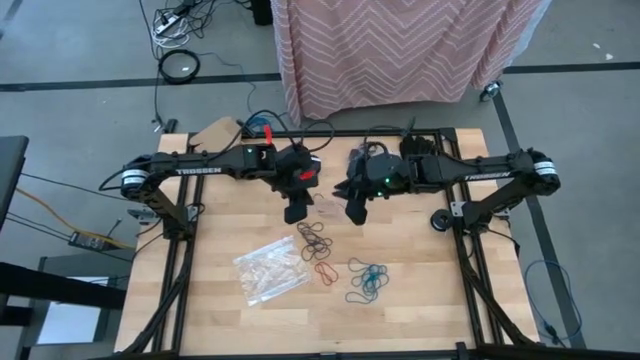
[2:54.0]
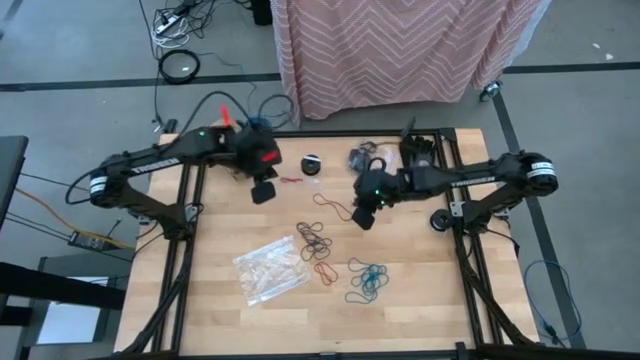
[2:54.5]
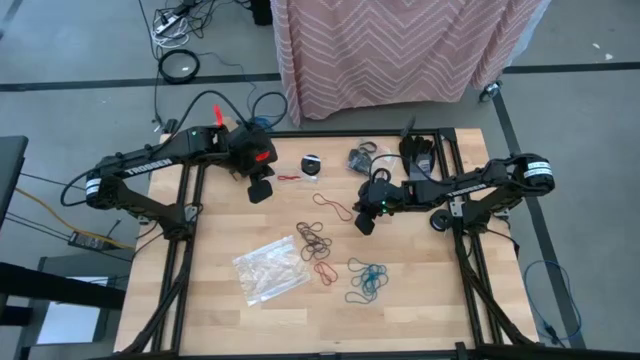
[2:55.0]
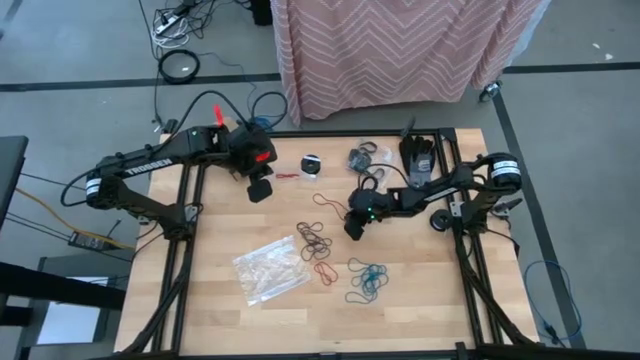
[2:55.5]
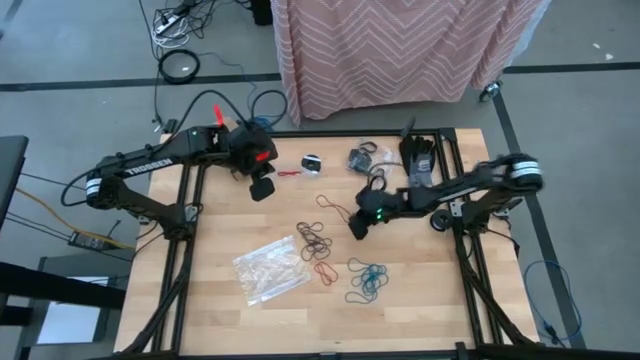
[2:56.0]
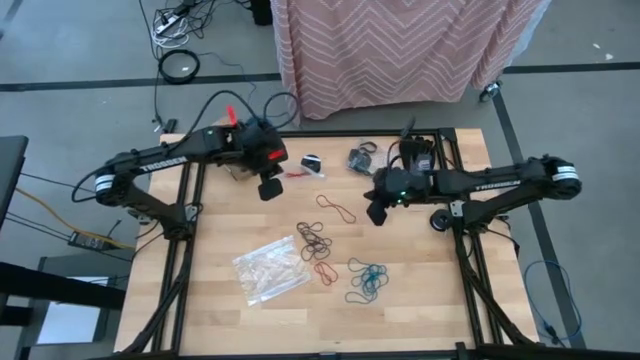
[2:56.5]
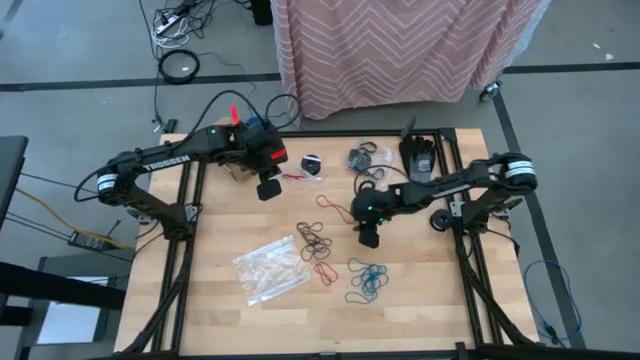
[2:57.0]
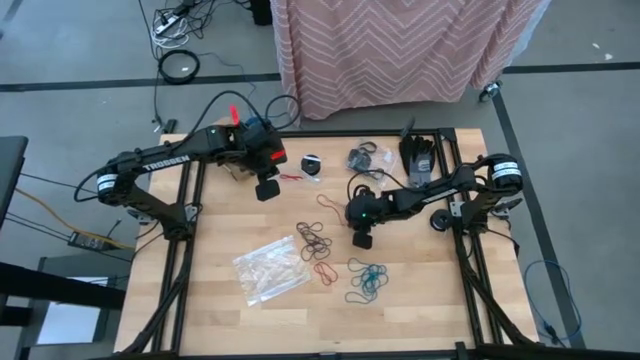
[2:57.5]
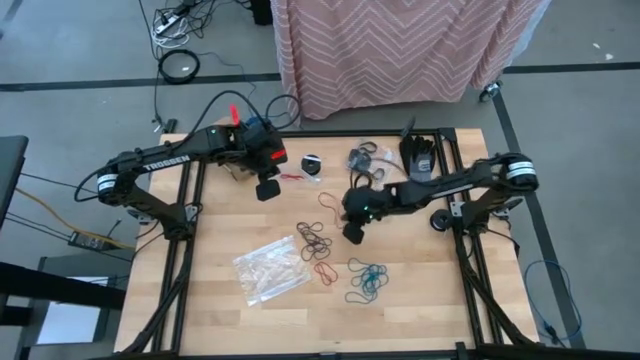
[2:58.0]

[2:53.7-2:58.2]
Task: Sort rubber bands
Put the red rubber band into the transparent zip bag

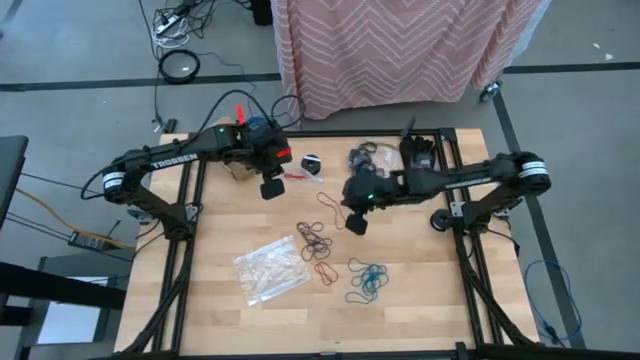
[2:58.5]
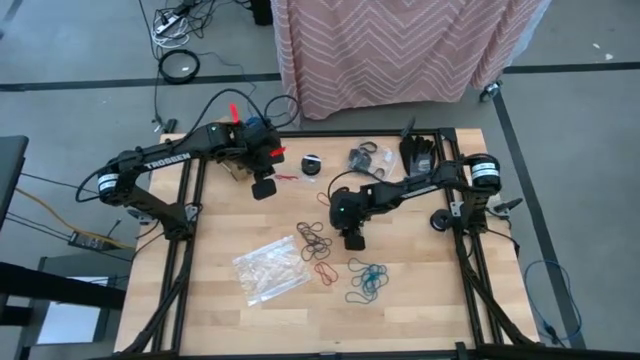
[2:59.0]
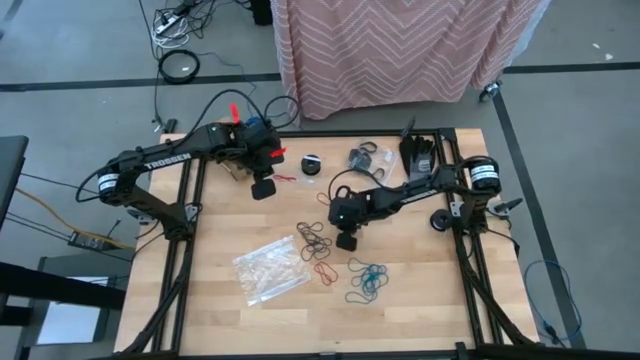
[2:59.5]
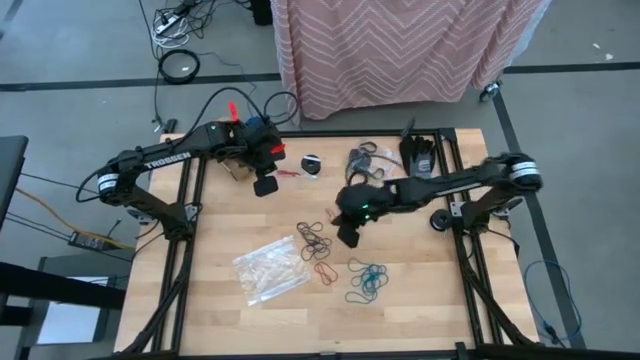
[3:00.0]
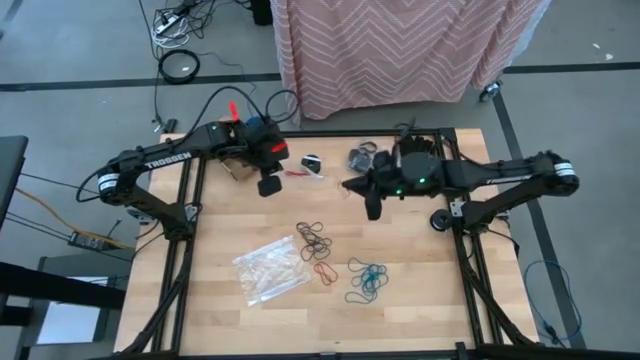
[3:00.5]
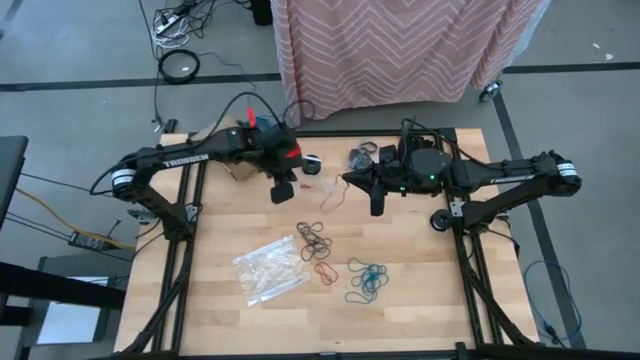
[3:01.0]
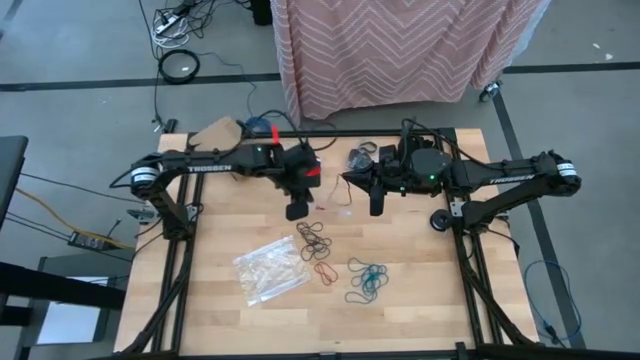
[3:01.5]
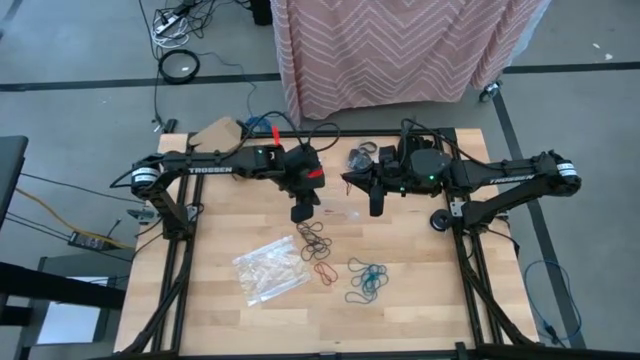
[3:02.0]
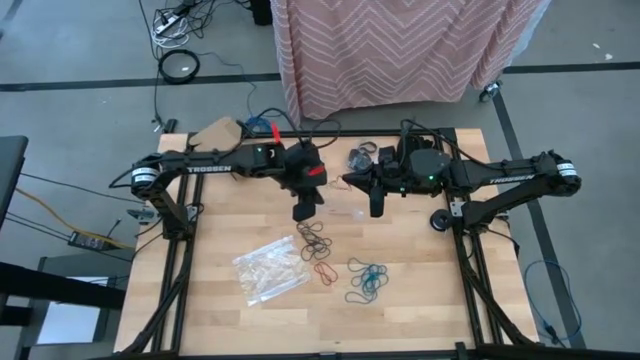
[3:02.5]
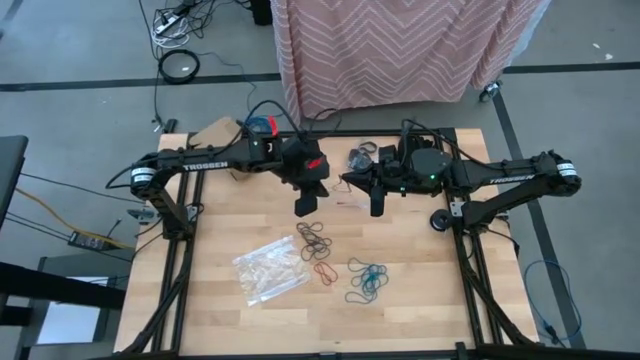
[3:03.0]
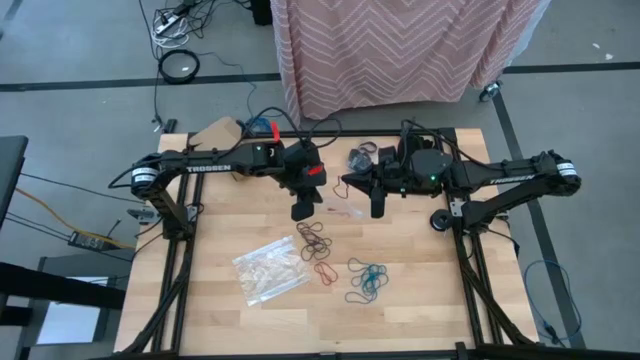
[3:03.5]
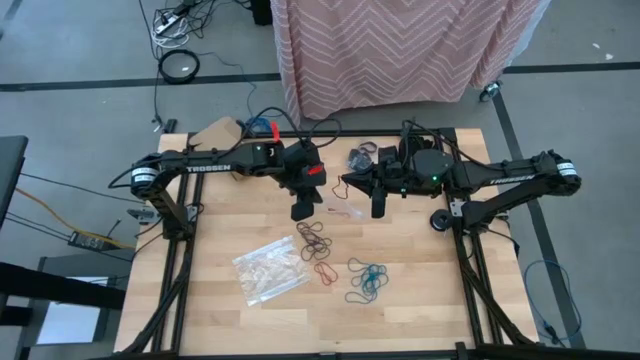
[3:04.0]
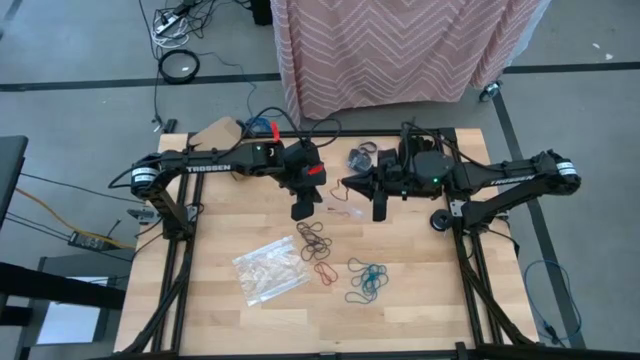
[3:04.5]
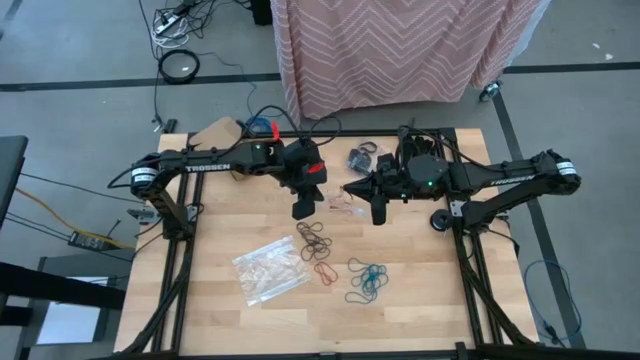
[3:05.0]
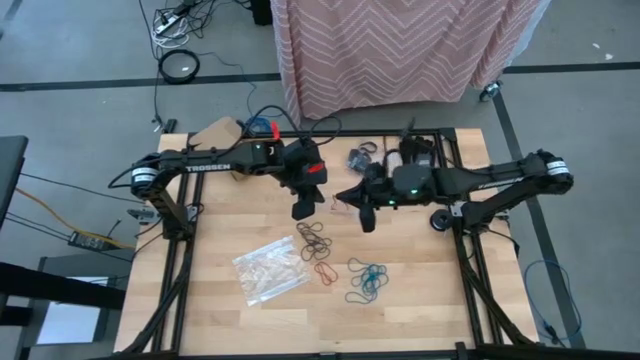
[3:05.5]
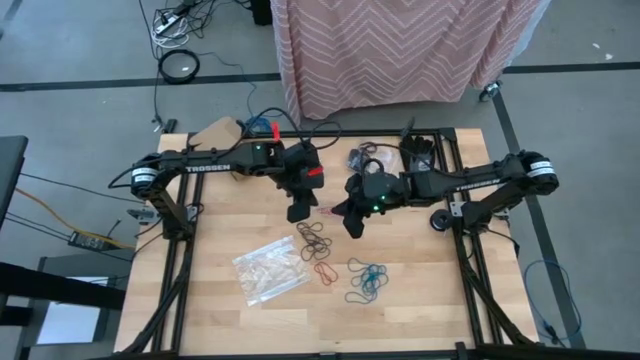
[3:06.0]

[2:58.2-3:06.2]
Put the red rubber band into the transparent zip bag

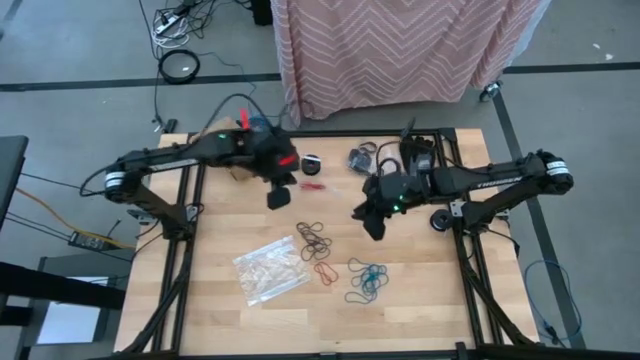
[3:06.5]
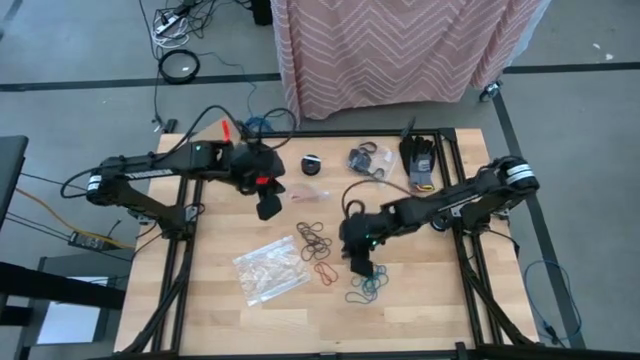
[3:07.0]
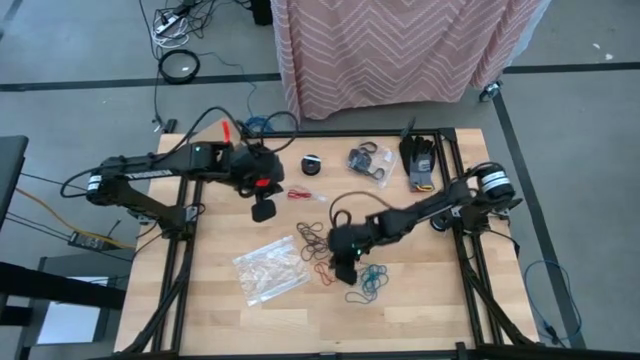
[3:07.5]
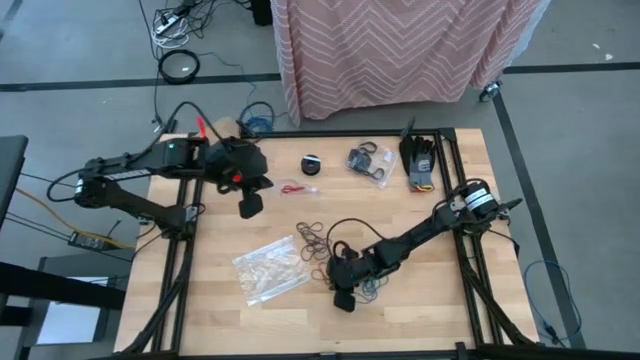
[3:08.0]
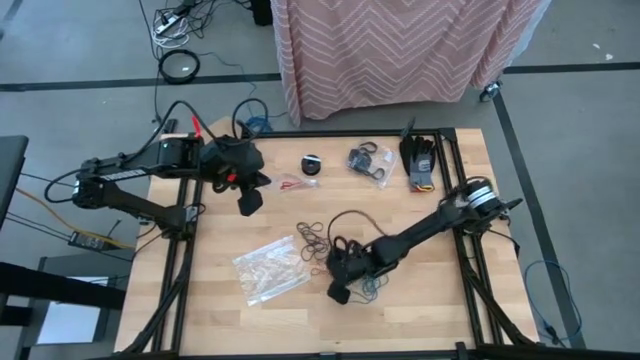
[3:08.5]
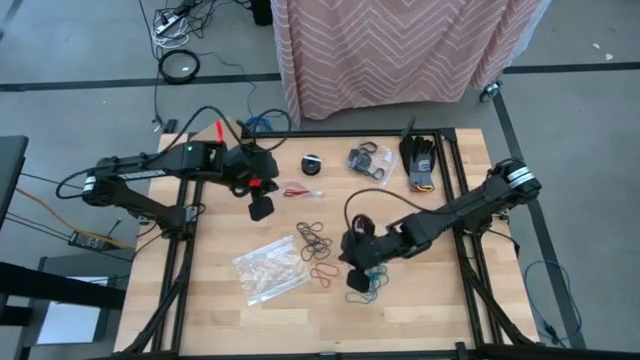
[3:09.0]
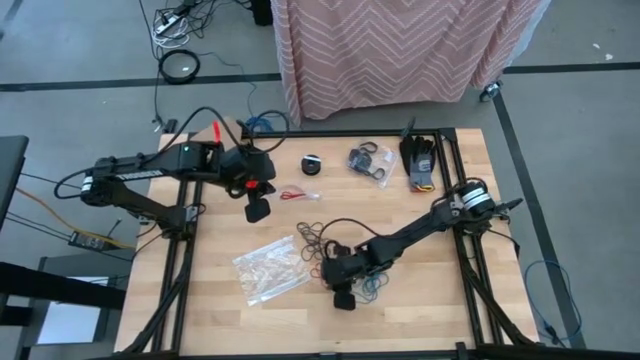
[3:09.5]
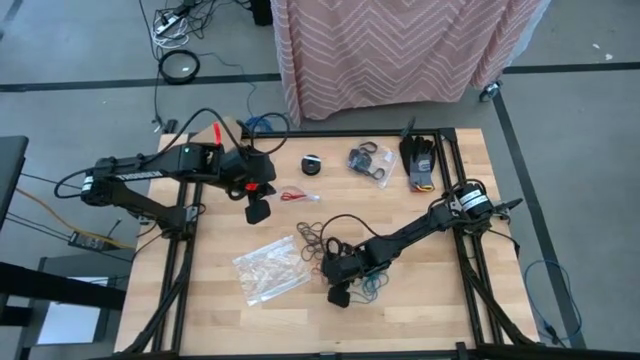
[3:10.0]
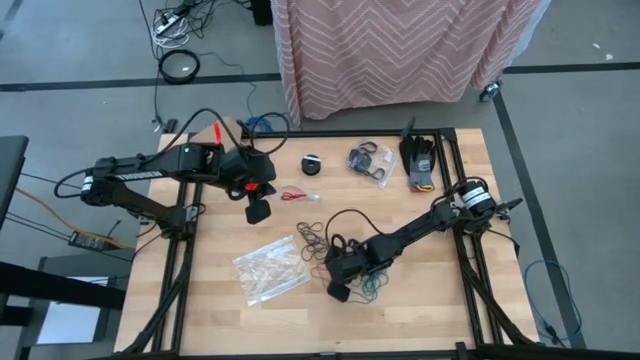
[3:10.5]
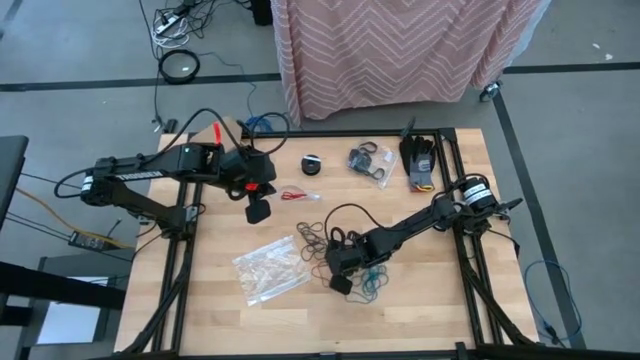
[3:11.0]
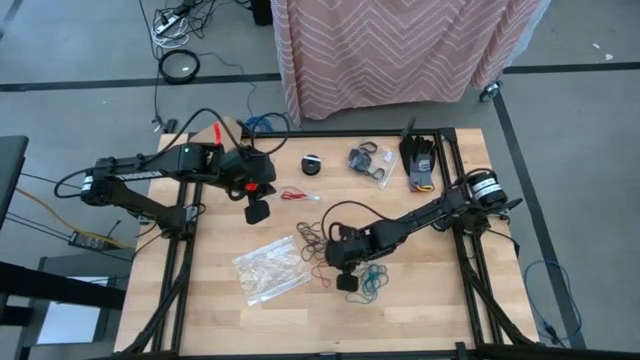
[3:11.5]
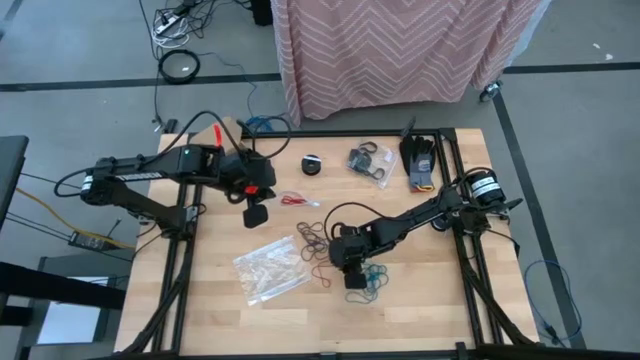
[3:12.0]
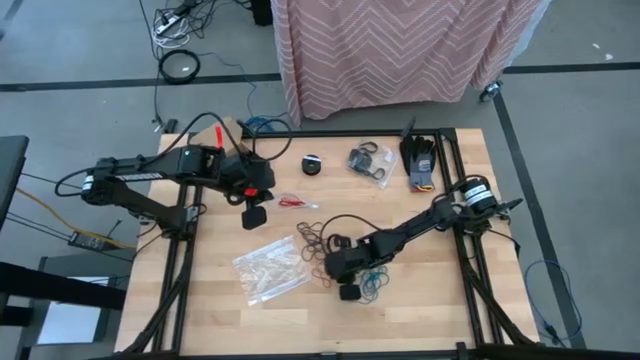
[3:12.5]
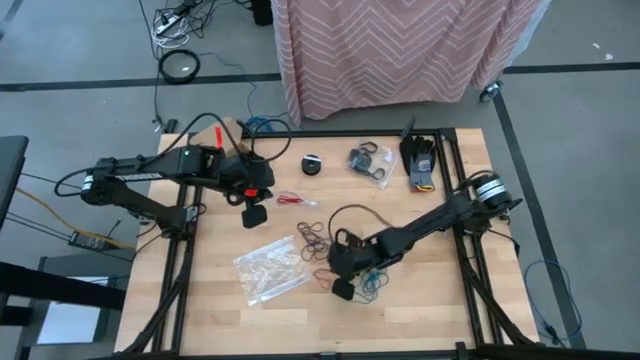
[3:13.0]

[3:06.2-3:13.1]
Put the red rubber band into the transparent zip bag

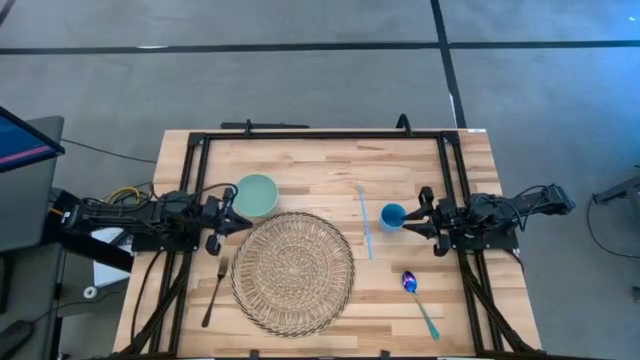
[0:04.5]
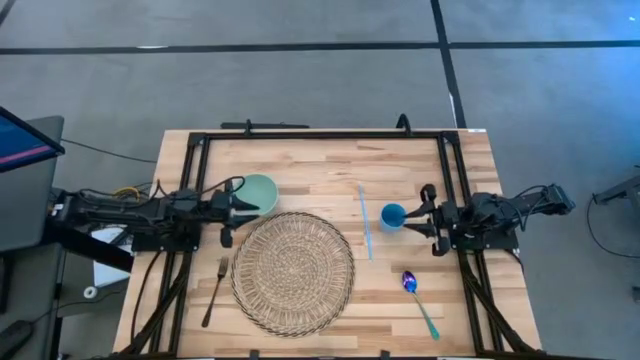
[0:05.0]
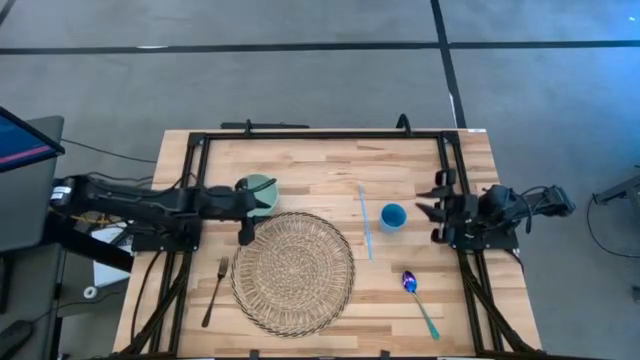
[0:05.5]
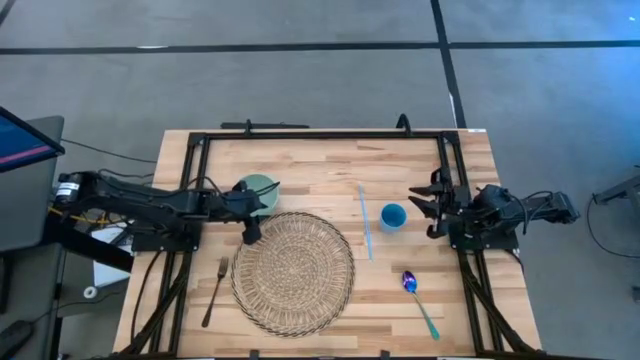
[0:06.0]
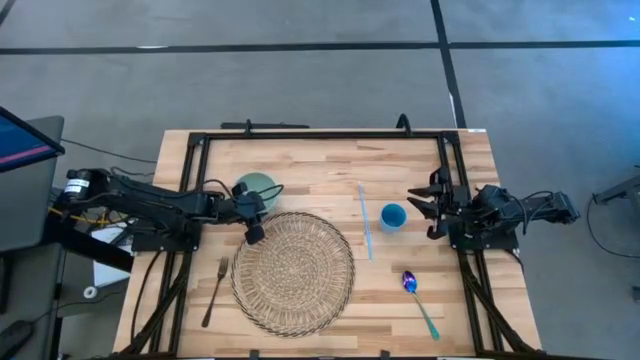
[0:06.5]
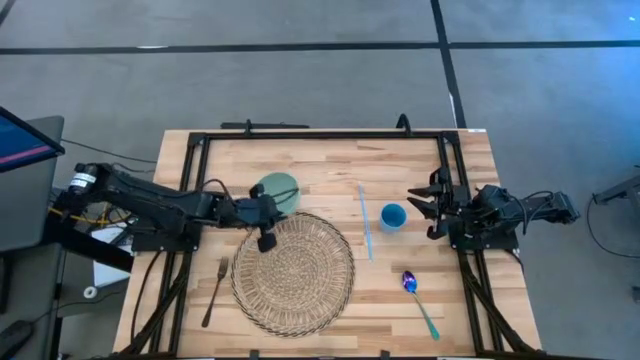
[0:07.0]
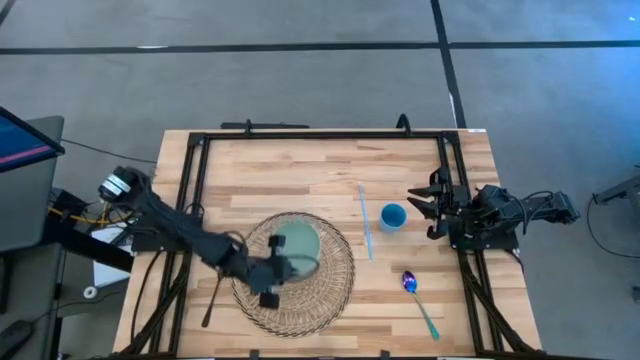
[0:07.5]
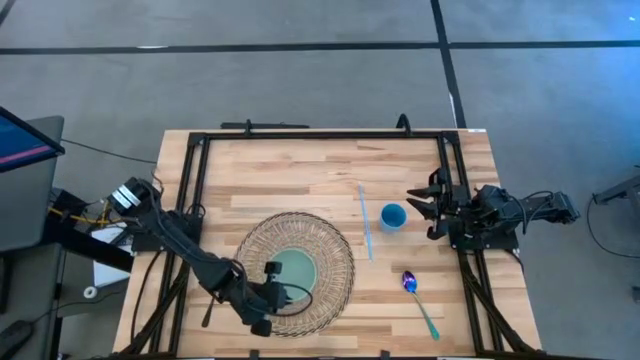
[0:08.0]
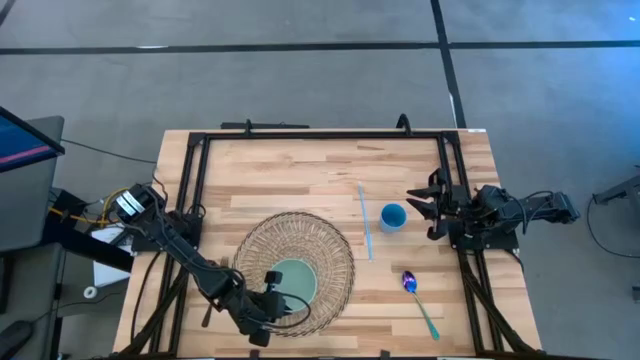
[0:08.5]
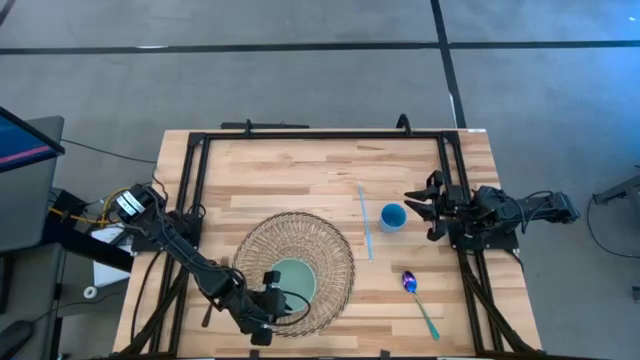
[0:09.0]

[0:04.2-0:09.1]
Task: Pick & Place Utensil
Put the green bowl on the bottom of the brown mat
